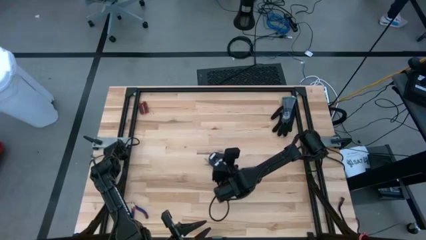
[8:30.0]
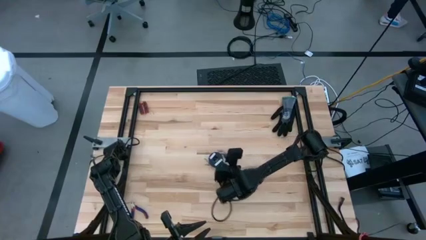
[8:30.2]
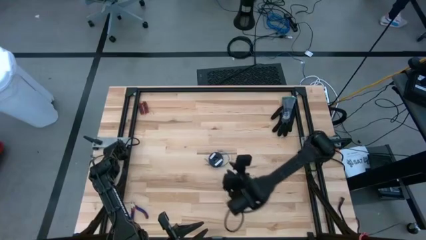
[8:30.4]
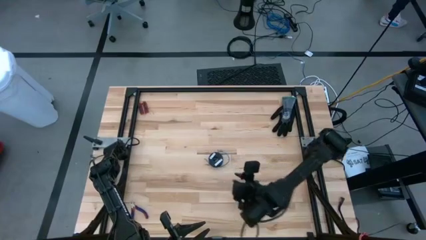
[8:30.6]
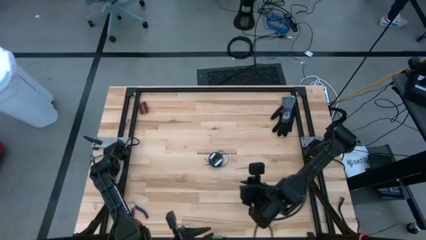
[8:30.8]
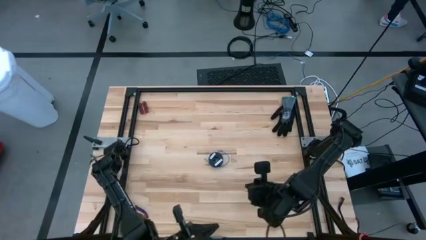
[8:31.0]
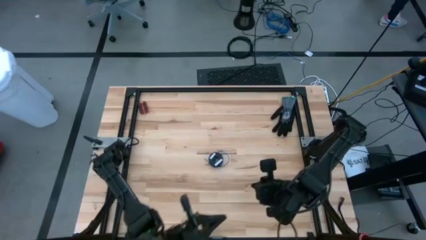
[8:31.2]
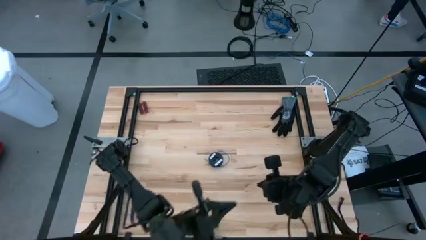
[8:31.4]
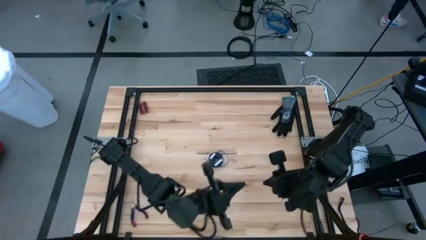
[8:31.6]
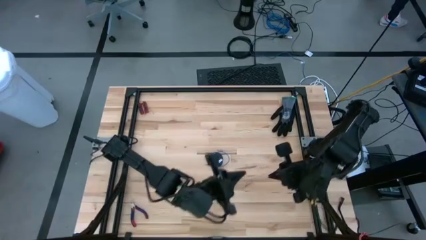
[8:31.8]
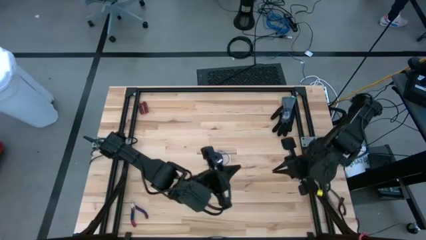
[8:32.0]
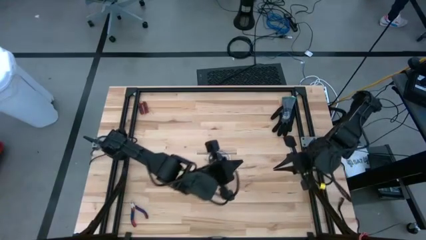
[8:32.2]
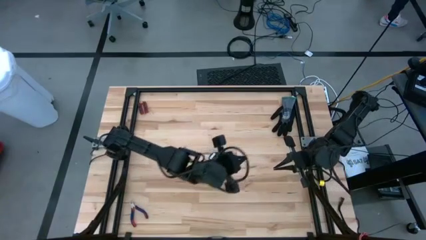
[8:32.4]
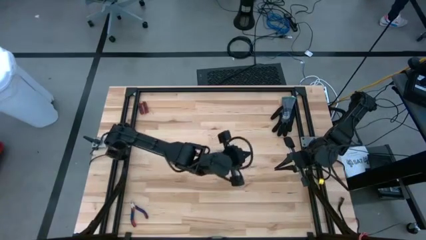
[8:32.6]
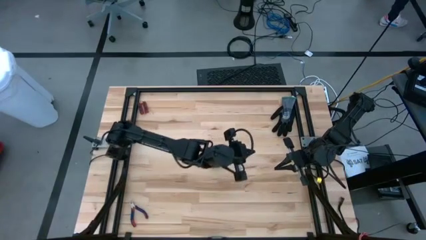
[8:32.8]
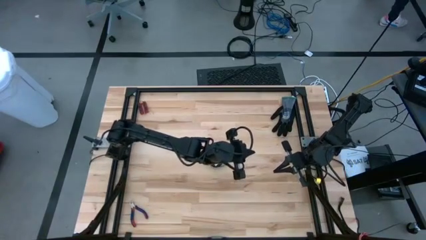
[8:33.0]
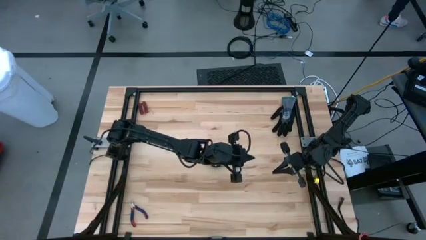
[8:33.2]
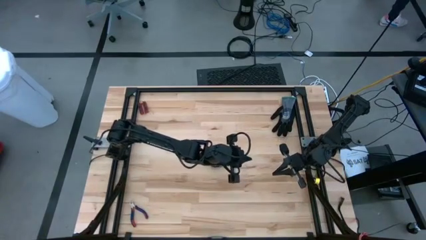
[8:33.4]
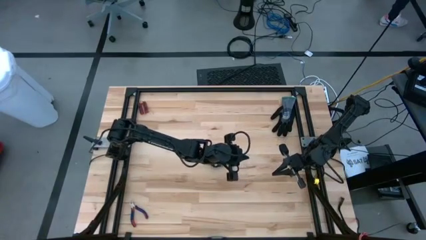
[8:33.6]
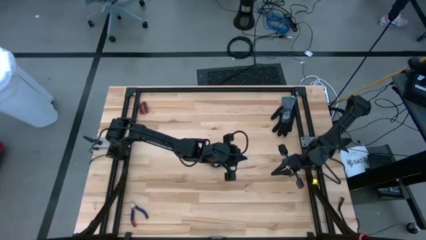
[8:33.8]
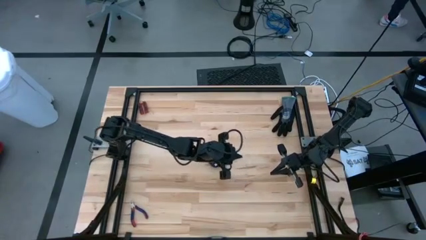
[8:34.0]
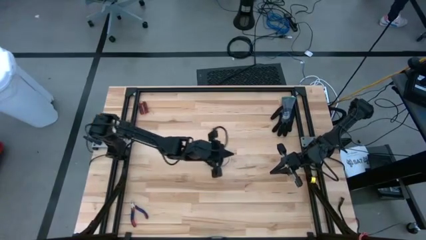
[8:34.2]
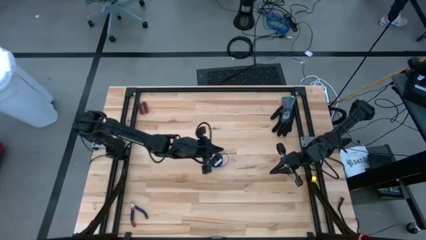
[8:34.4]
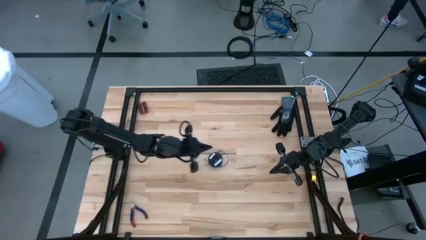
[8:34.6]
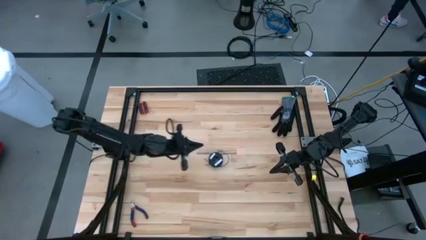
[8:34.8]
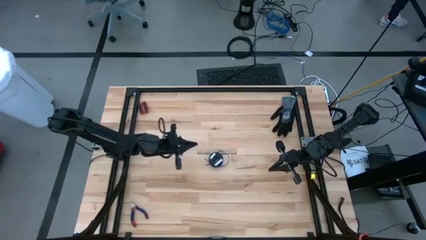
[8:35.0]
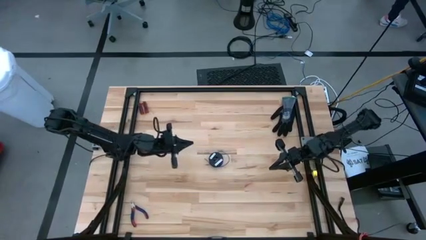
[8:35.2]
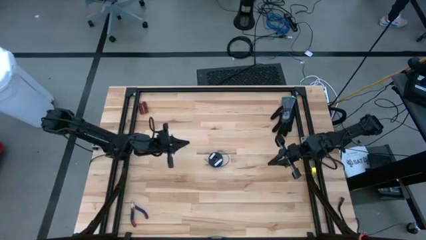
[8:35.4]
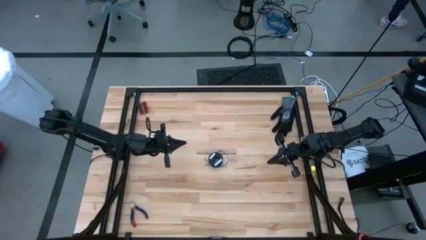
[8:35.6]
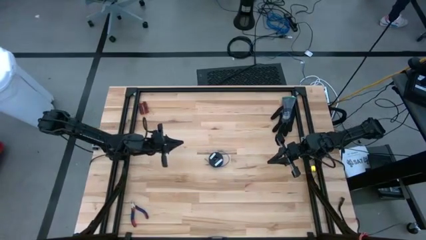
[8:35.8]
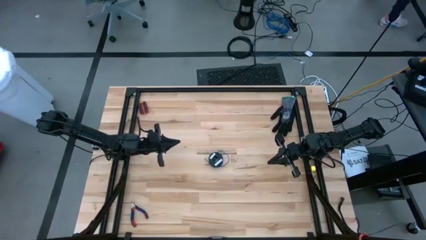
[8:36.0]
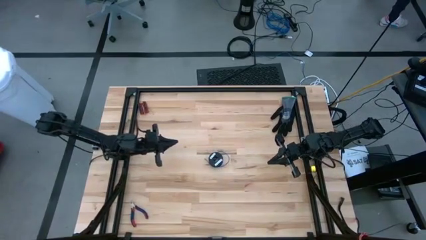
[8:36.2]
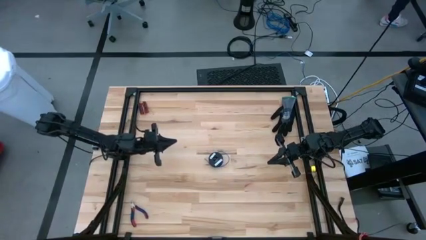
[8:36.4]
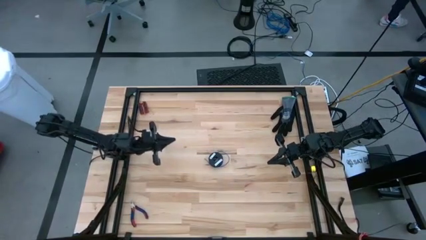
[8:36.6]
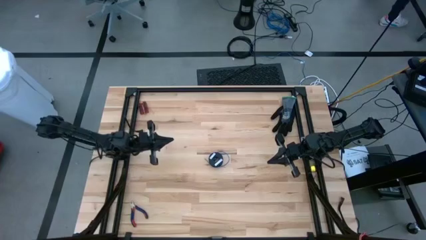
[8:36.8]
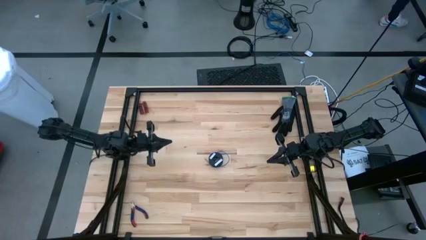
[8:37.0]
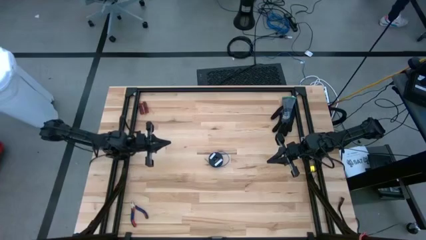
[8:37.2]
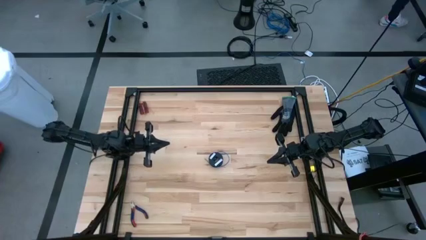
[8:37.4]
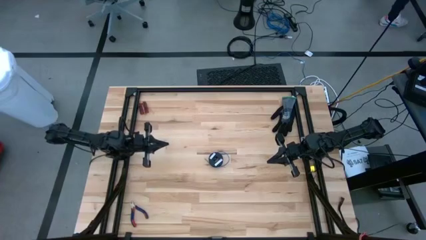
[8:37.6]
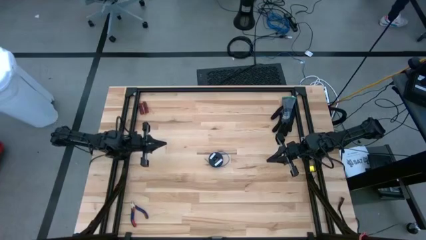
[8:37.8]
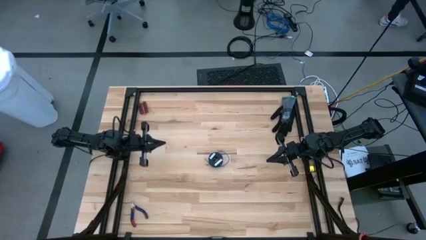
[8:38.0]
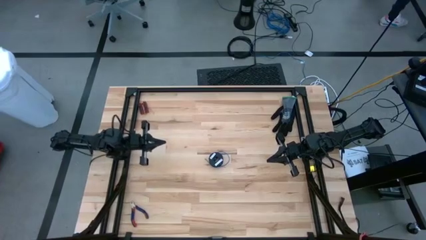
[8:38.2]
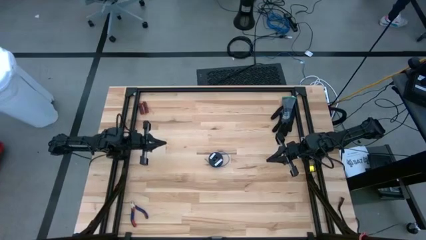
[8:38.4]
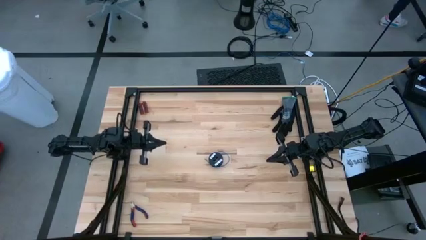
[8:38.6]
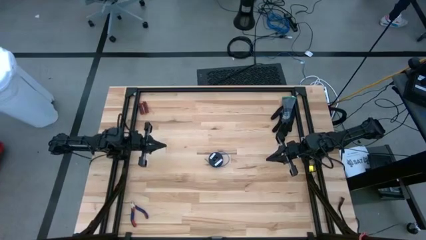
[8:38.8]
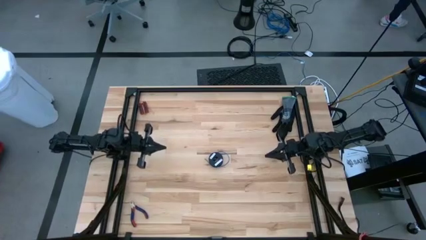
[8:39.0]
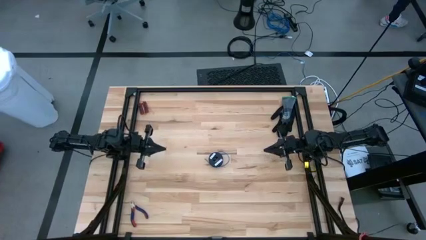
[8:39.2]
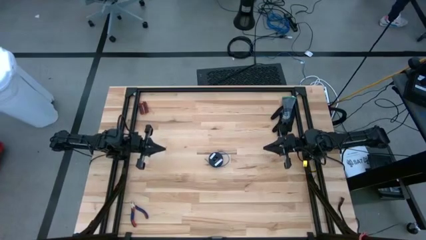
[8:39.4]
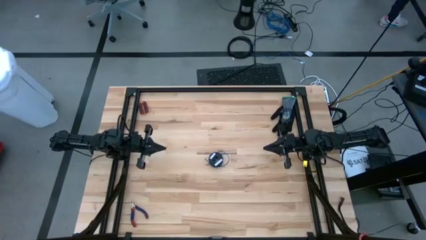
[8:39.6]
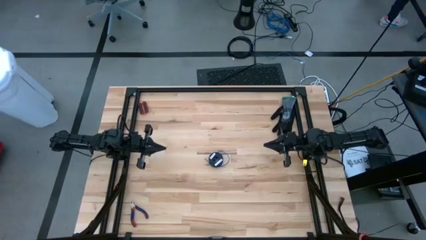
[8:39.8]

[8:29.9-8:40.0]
Task: Coil cords
Return to Home Position

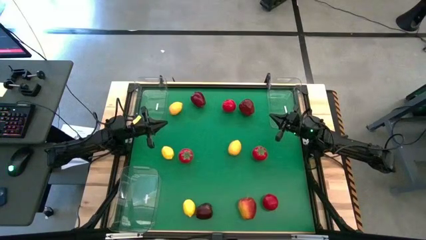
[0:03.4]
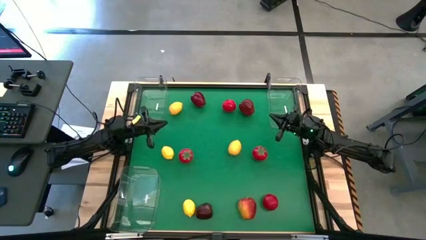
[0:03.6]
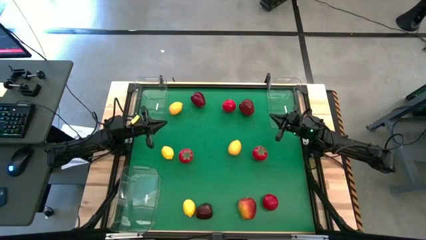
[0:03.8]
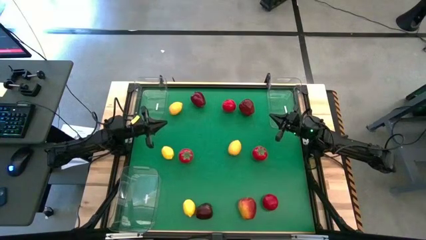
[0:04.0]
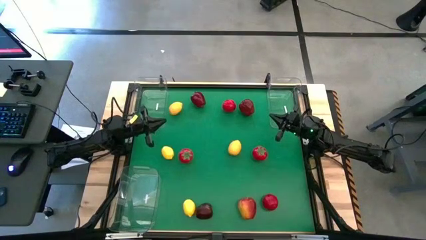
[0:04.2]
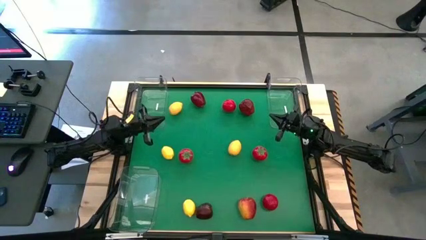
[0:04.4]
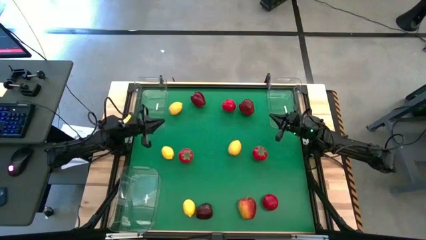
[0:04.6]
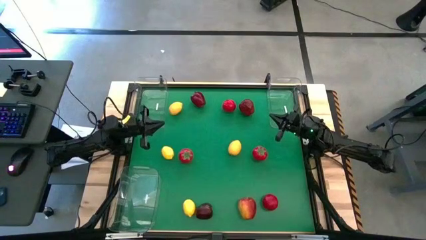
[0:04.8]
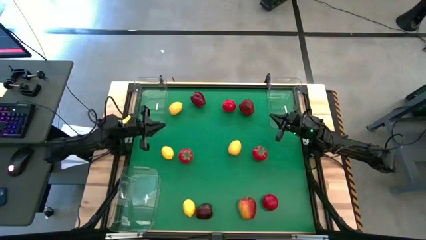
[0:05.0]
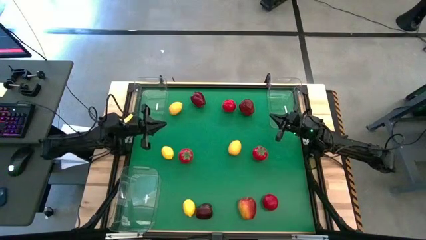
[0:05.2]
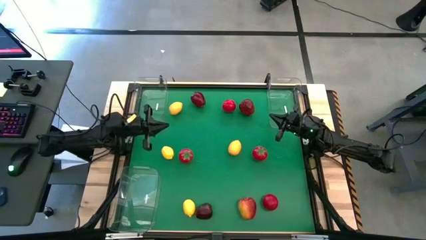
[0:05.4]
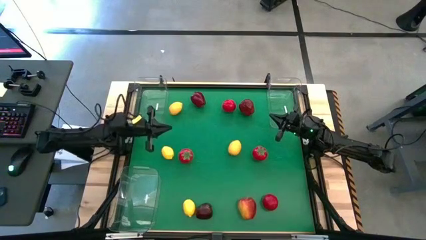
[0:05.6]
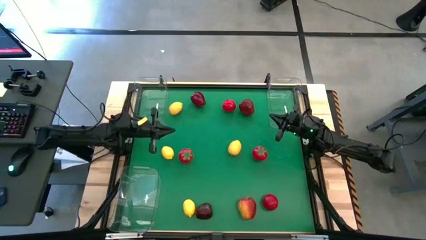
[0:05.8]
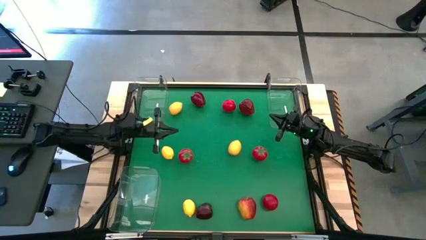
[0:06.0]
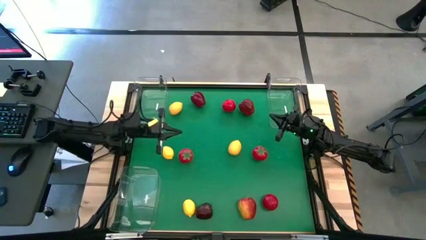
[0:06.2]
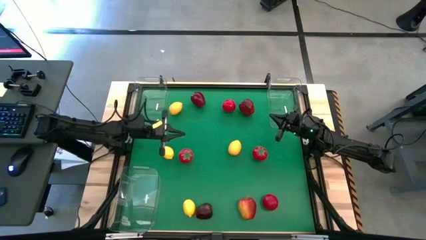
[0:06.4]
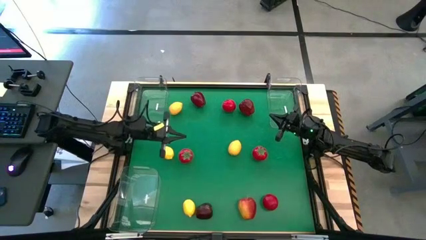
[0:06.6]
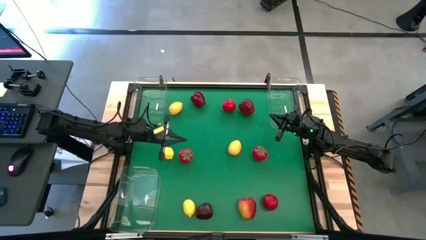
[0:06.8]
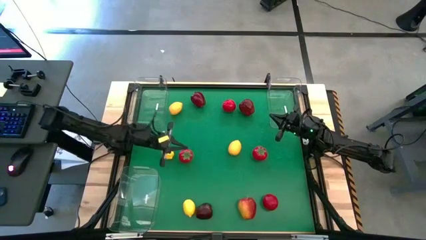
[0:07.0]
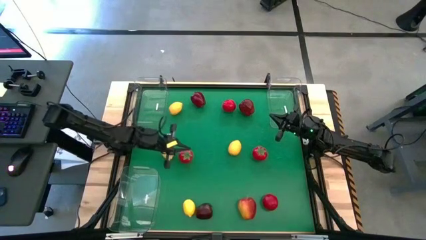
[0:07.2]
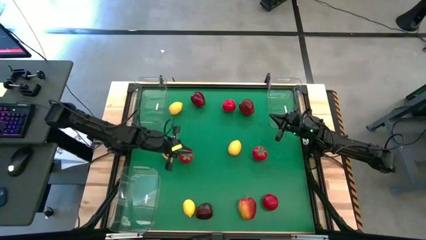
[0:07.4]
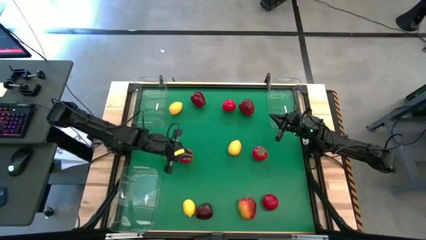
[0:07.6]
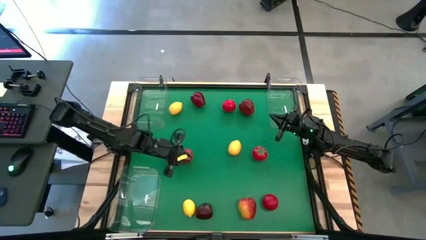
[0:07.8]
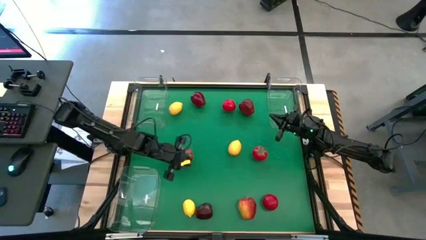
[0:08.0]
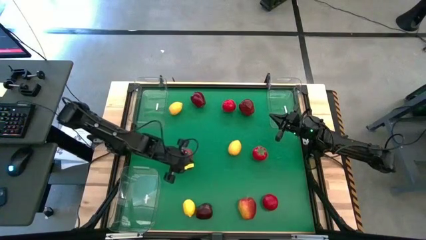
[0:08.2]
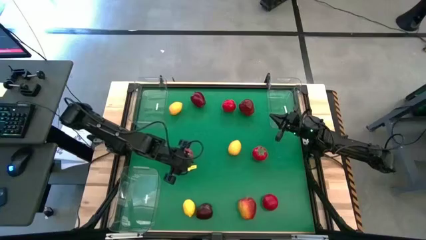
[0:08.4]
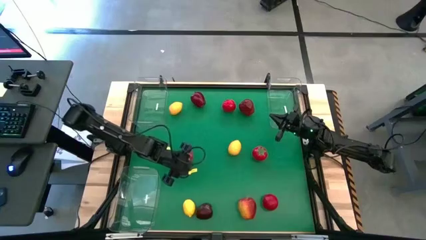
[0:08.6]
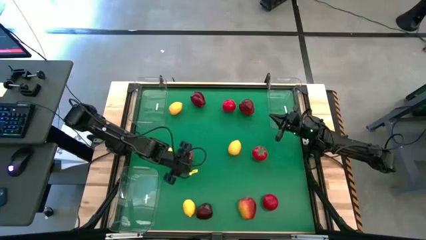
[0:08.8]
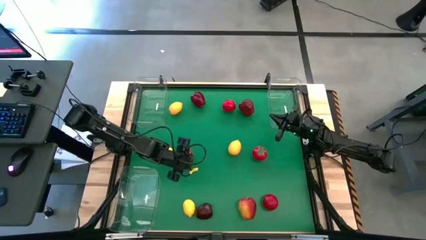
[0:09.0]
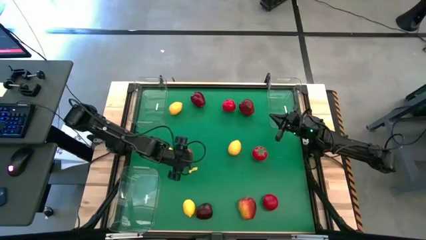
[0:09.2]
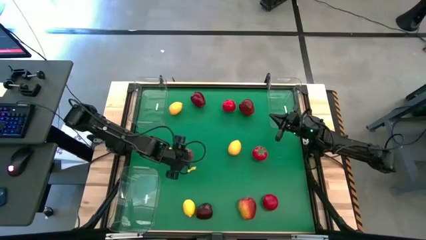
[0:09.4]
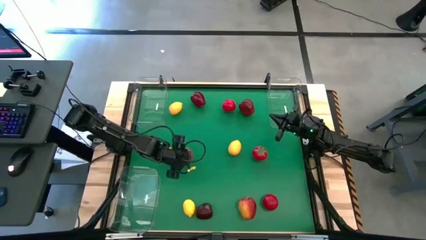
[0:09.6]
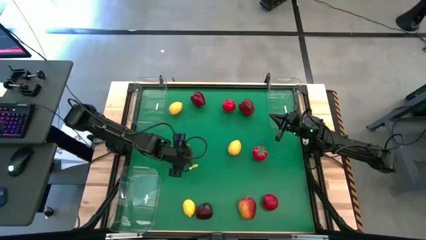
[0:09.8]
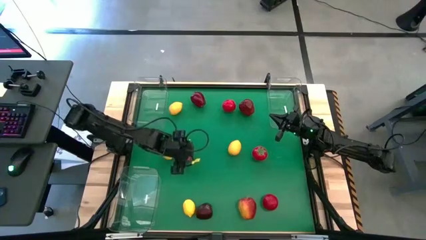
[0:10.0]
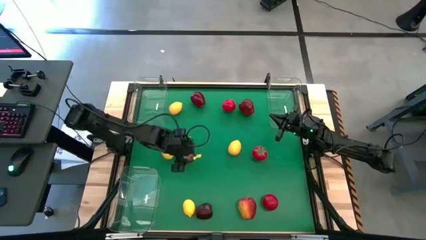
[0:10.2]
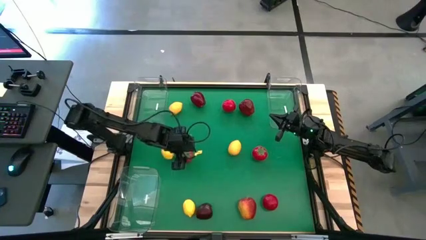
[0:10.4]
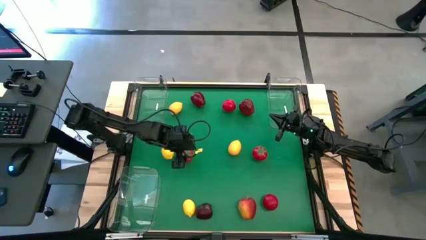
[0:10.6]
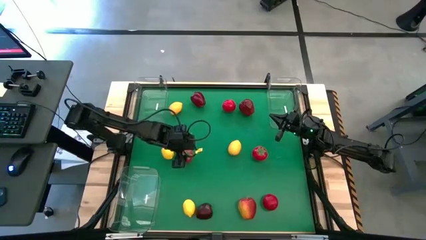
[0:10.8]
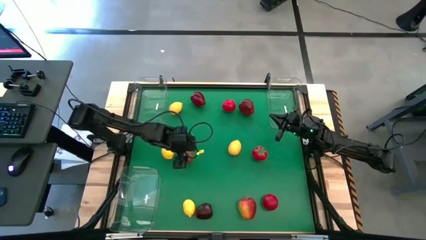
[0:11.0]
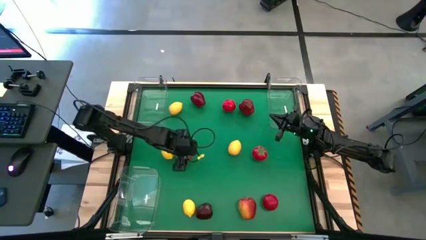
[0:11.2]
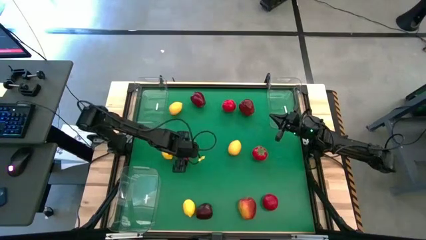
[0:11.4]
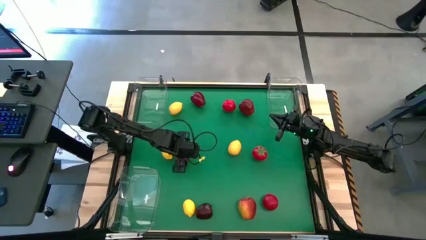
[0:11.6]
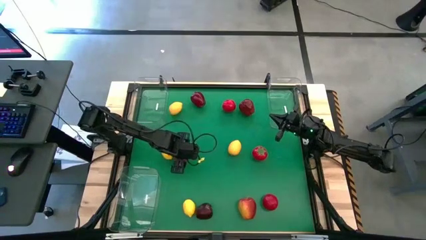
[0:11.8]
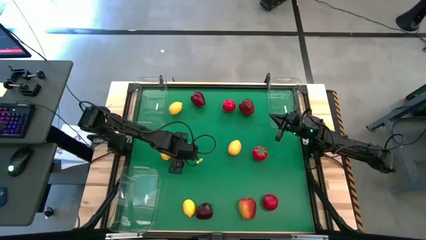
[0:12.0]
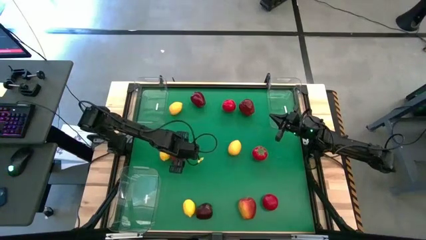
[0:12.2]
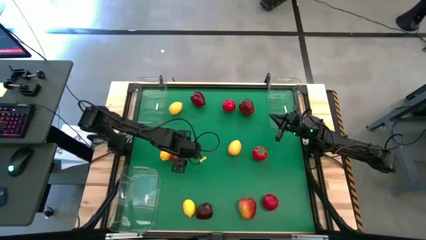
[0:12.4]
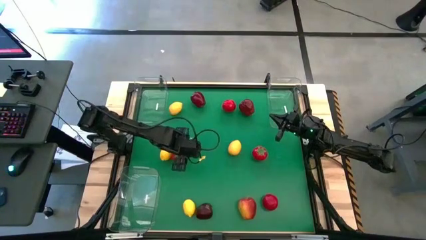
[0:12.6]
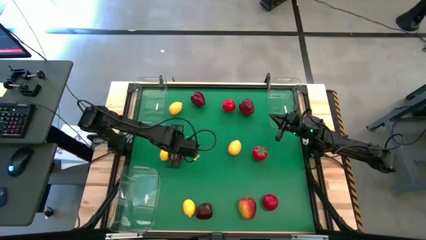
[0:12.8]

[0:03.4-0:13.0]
Task: Sort produce into baskets
Put the tomato into the top left bin
